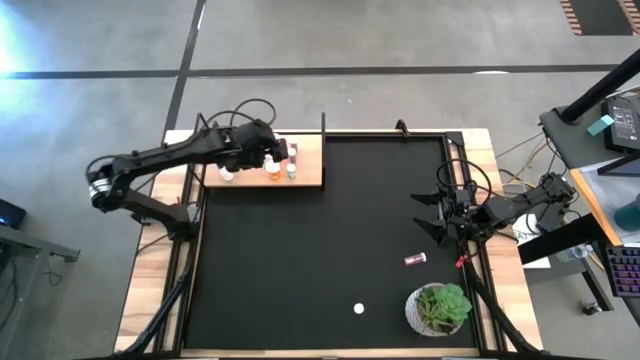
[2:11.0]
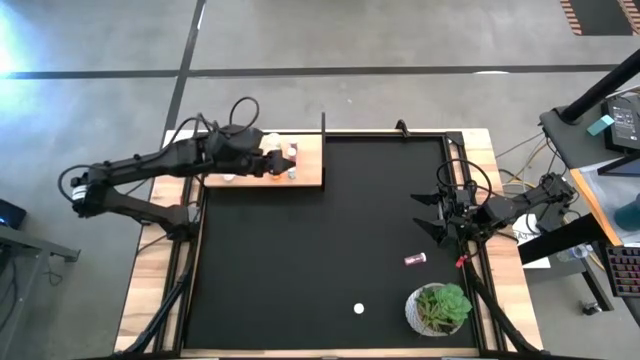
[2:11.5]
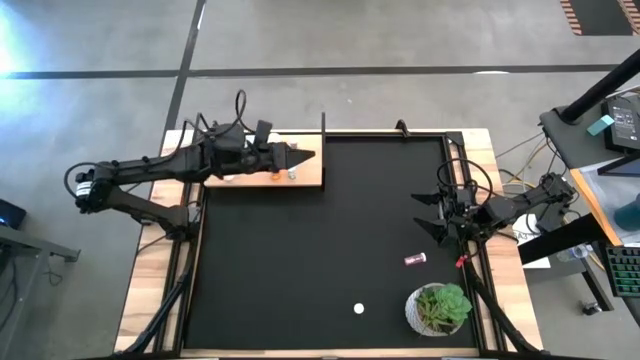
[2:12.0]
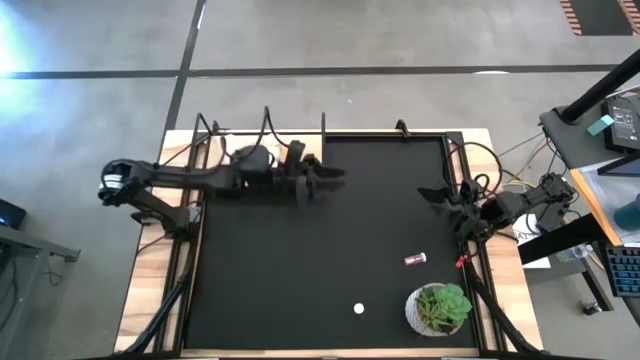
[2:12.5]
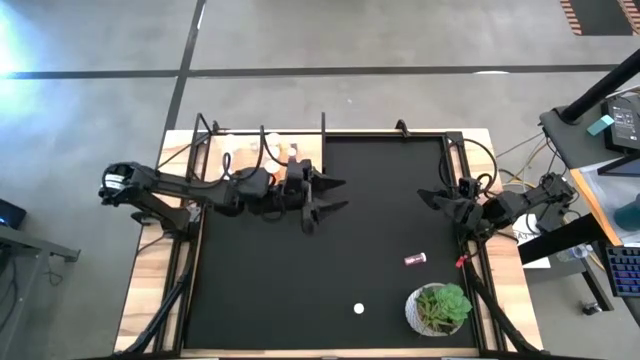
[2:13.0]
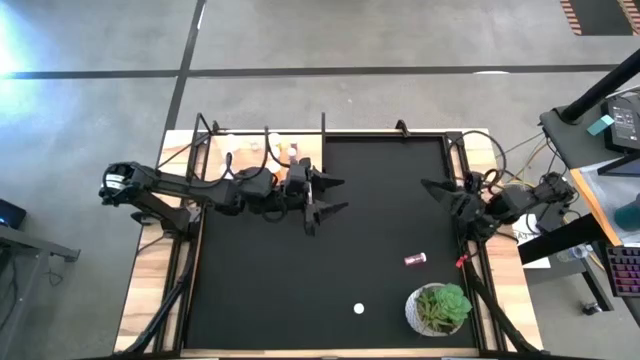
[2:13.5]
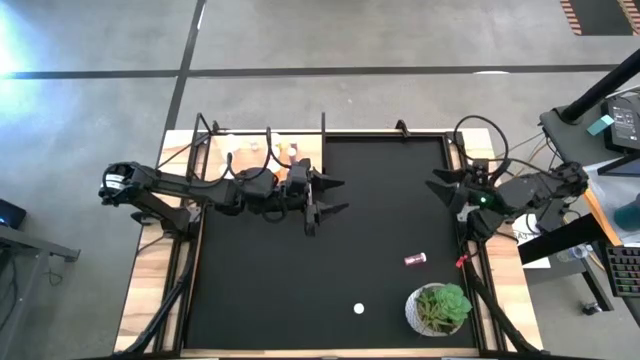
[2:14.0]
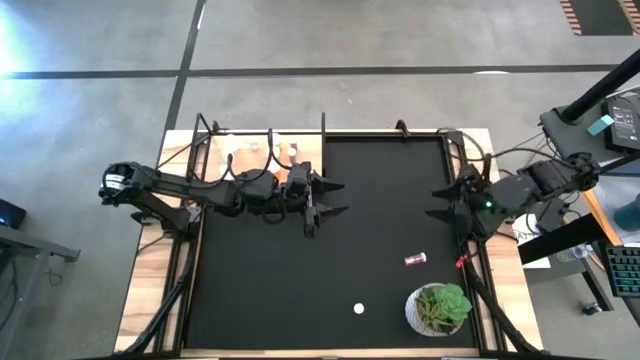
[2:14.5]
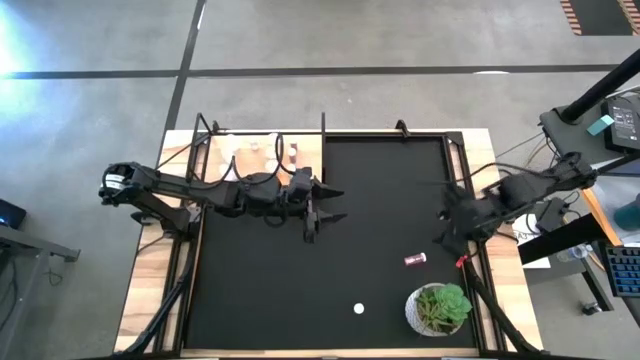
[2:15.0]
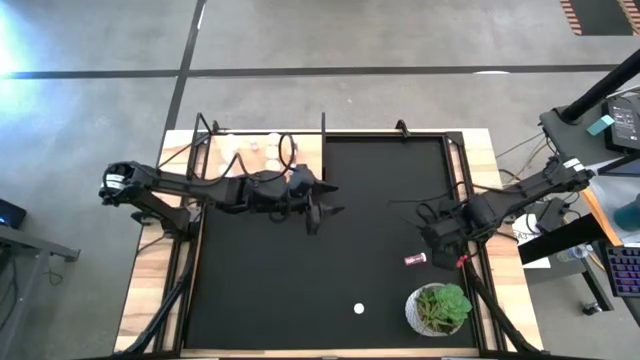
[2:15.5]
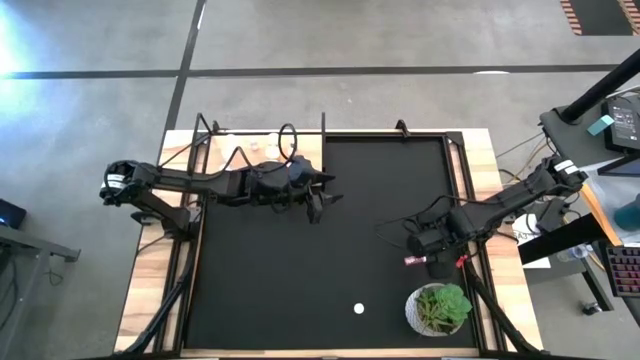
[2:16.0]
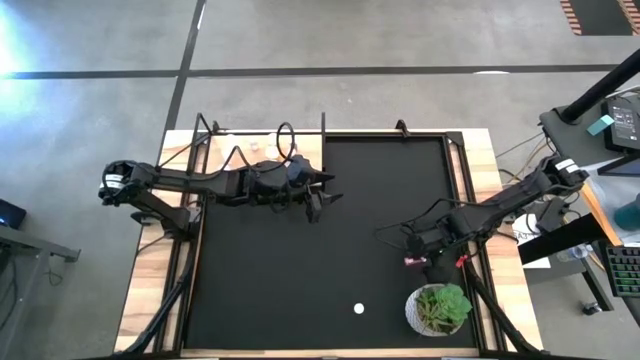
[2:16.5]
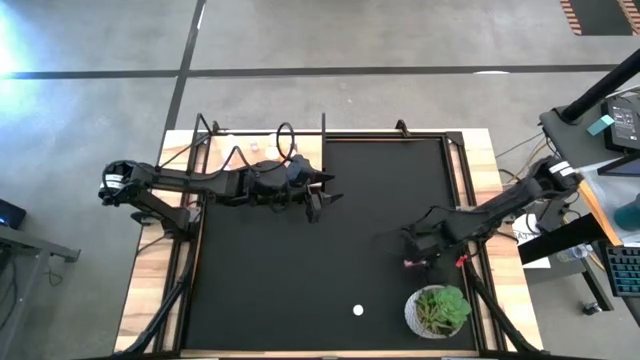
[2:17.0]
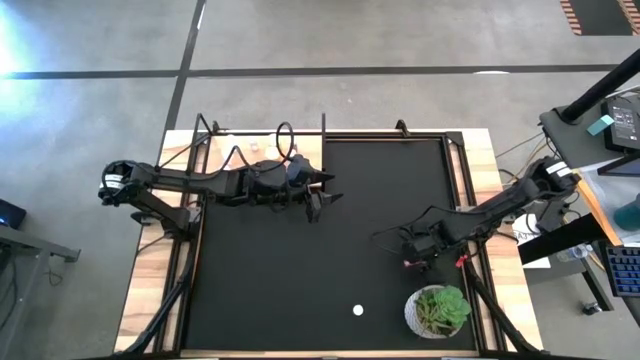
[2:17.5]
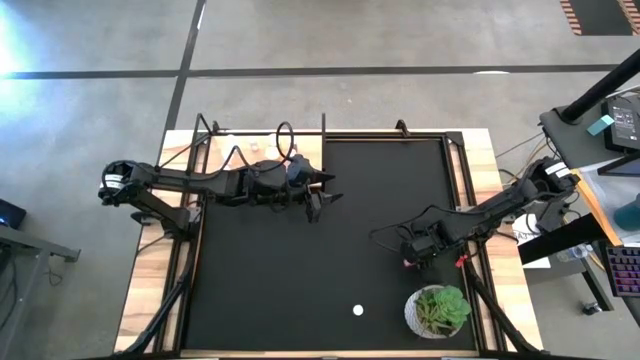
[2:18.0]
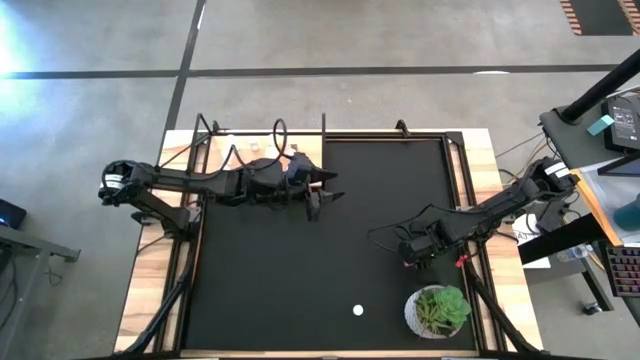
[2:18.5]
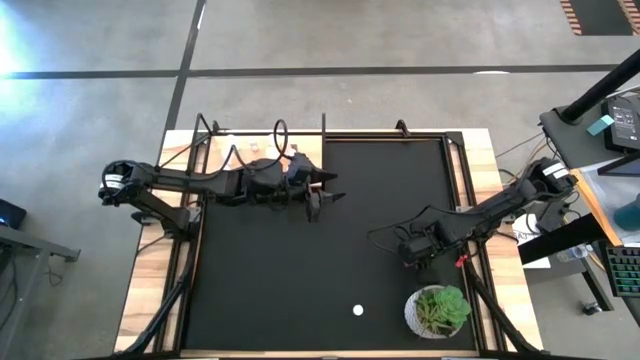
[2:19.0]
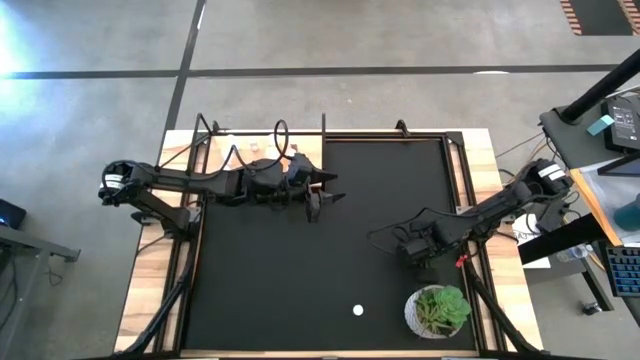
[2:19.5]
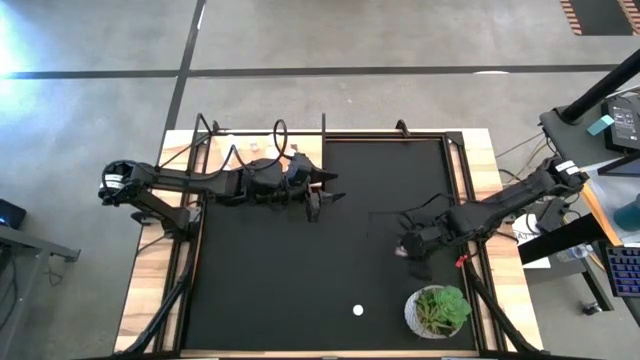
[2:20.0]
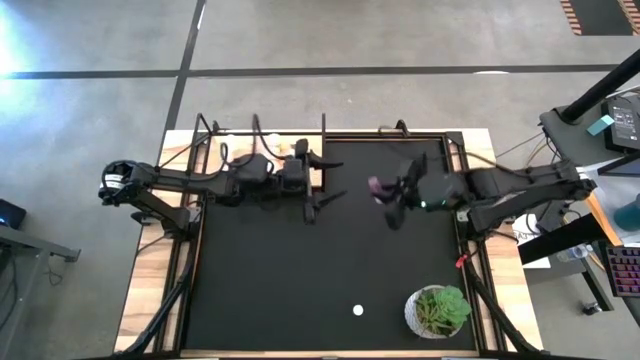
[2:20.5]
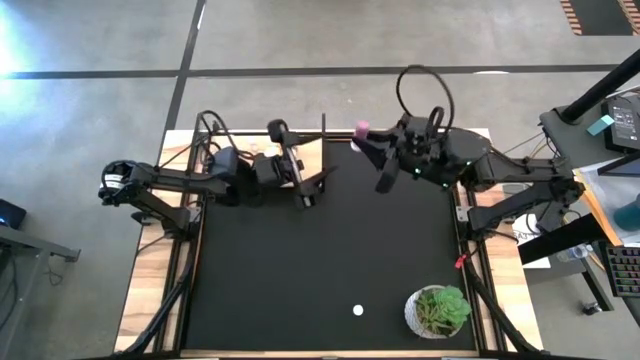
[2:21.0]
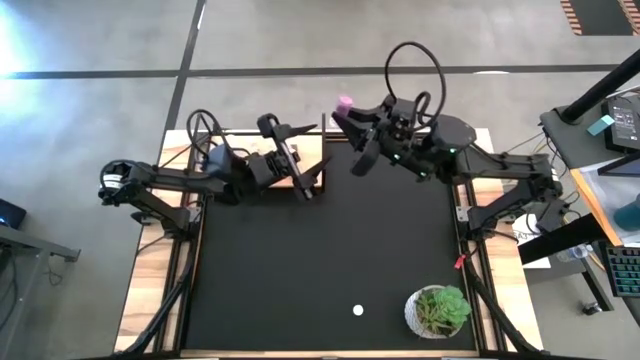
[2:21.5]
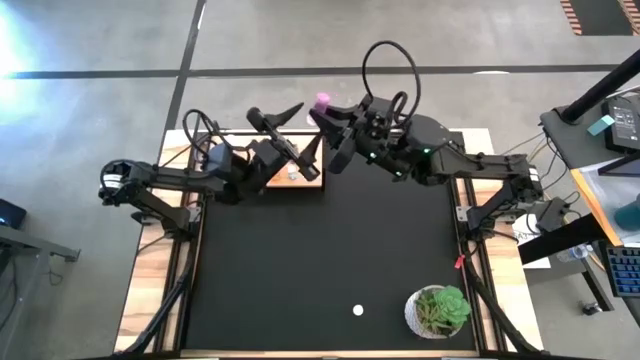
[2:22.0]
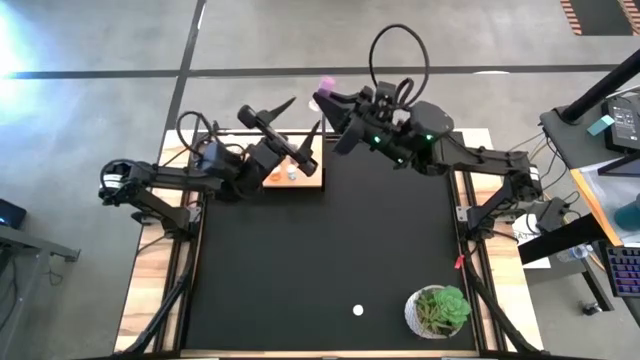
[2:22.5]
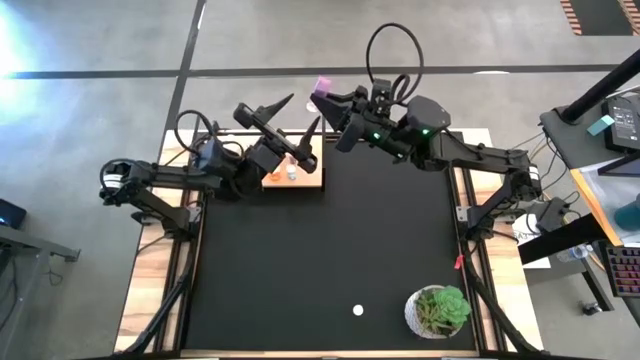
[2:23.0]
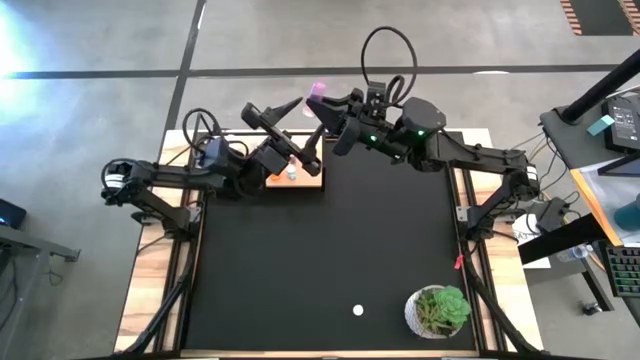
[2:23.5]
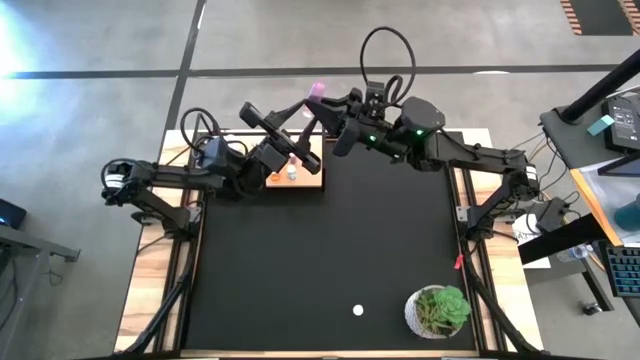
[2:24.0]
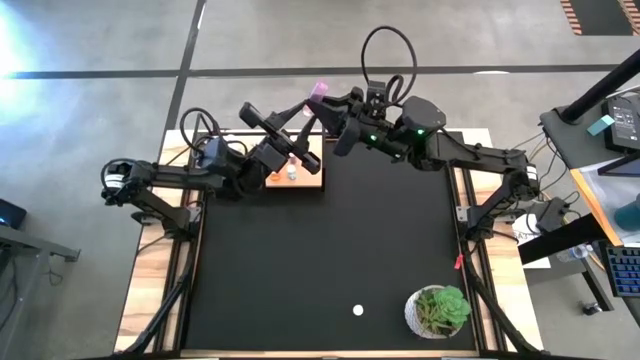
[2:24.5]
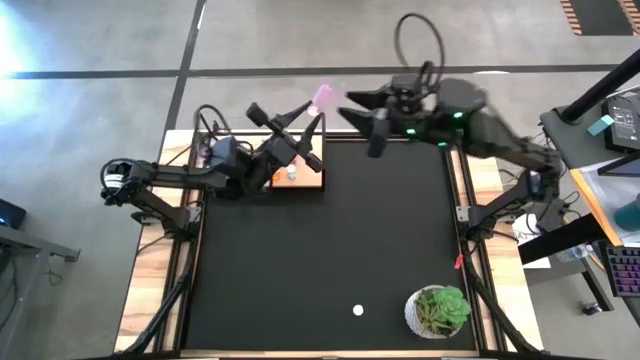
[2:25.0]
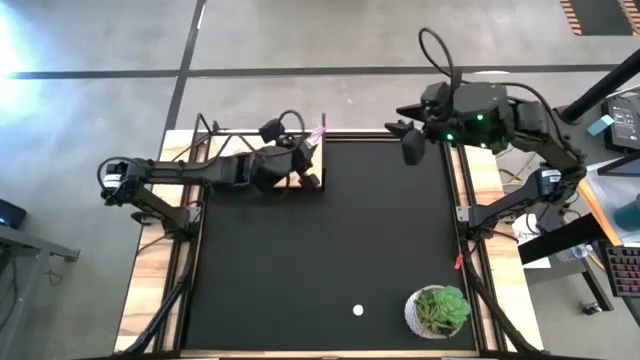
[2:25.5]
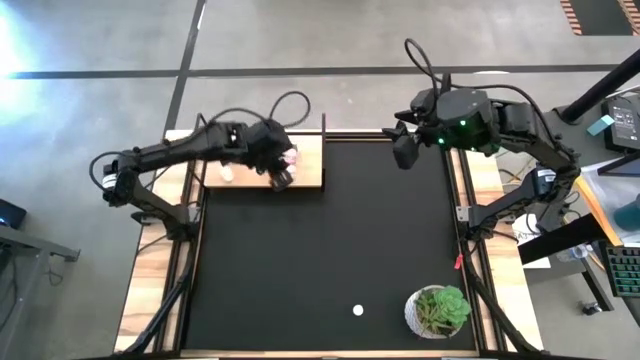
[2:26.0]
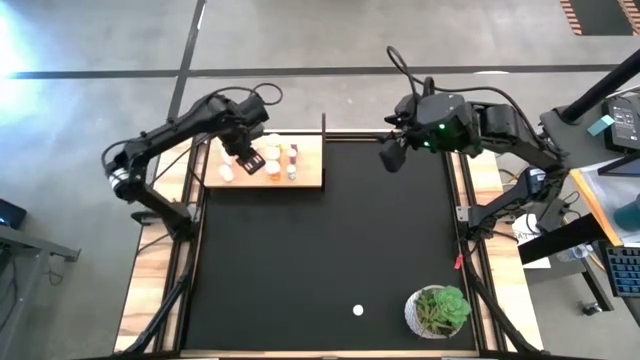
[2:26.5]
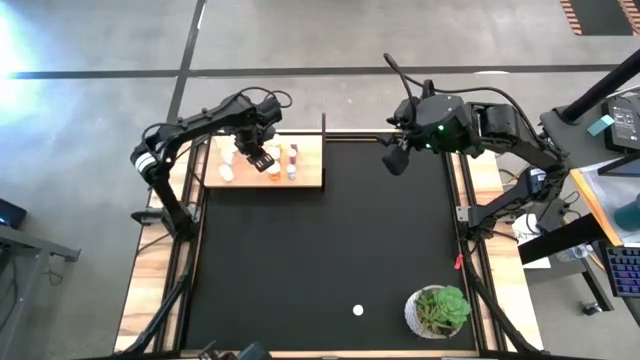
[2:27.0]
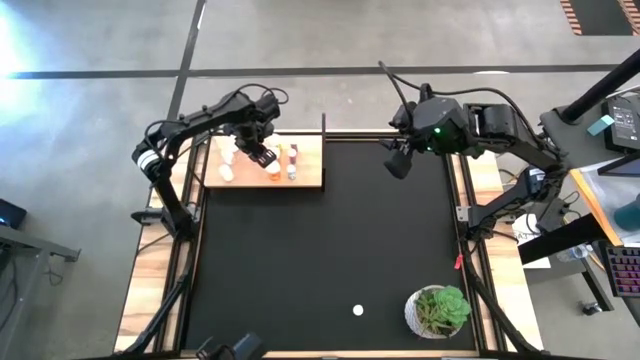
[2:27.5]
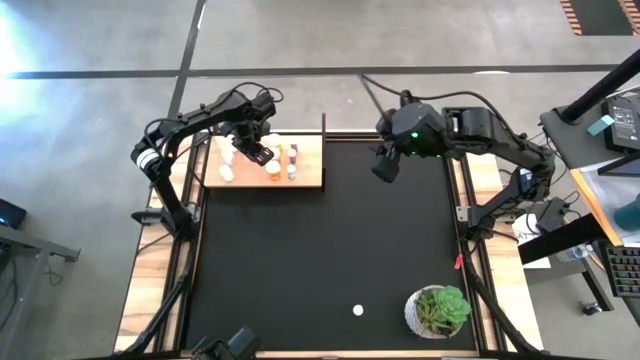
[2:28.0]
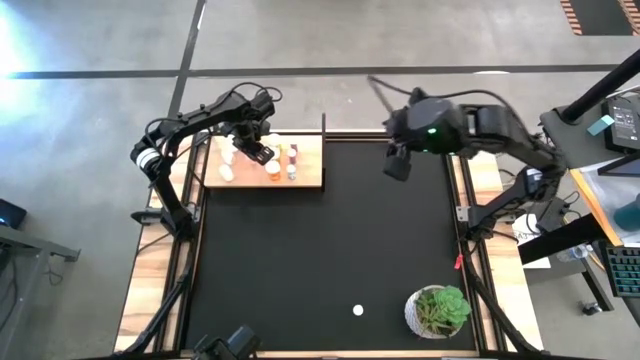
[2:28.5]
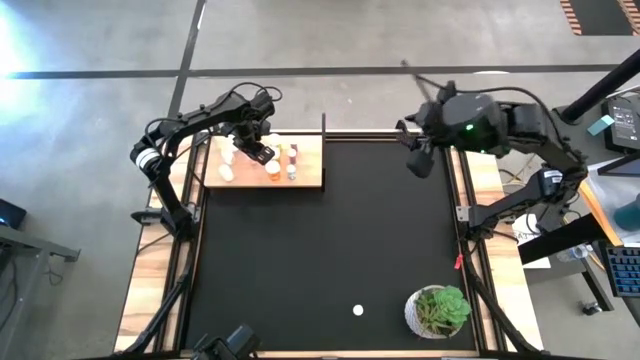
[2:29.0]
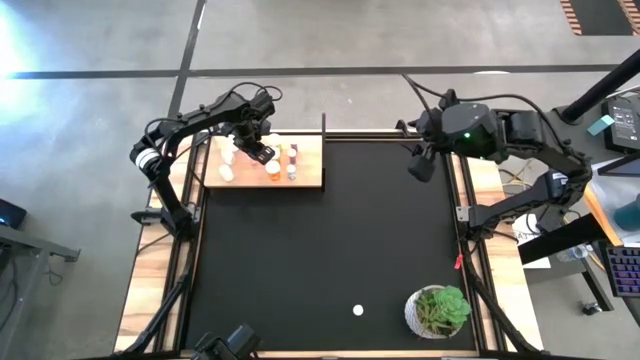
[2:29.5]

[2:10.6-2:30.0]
Task: Pick and place medicine bottles onto shelf by color
Put the top pink pill bottle on the shelf aligned with the other pink pill bottle

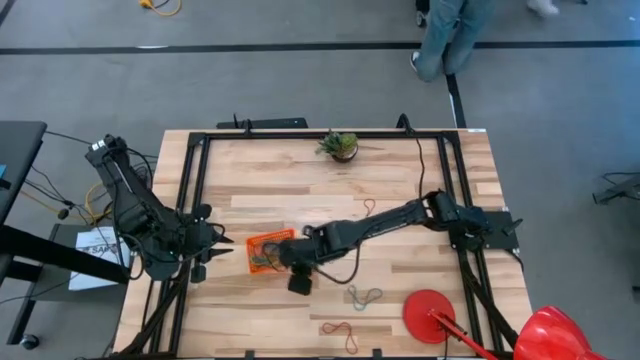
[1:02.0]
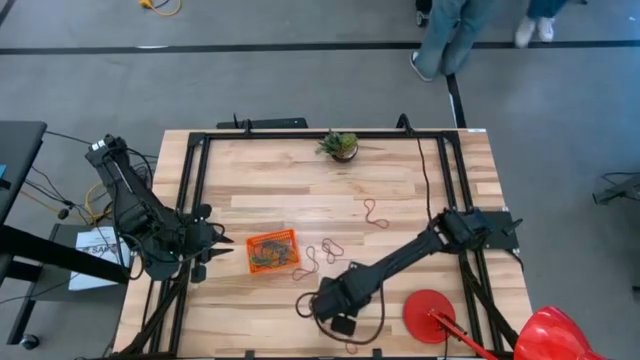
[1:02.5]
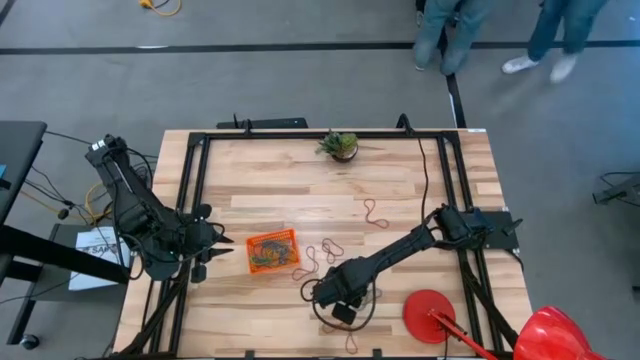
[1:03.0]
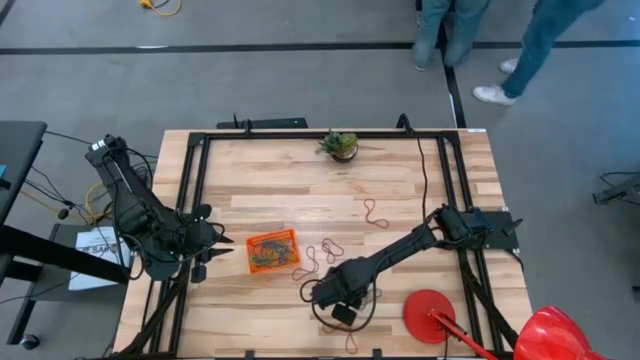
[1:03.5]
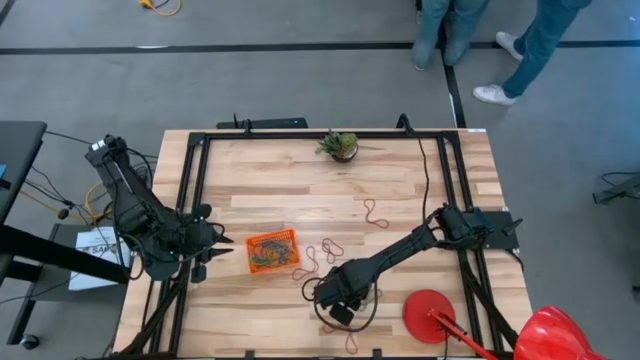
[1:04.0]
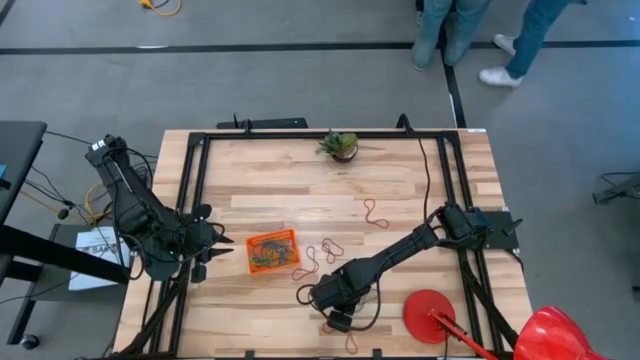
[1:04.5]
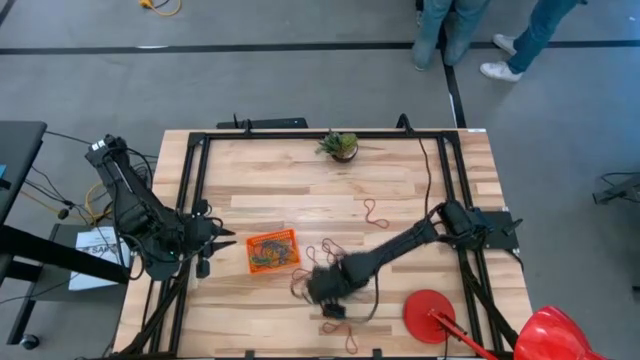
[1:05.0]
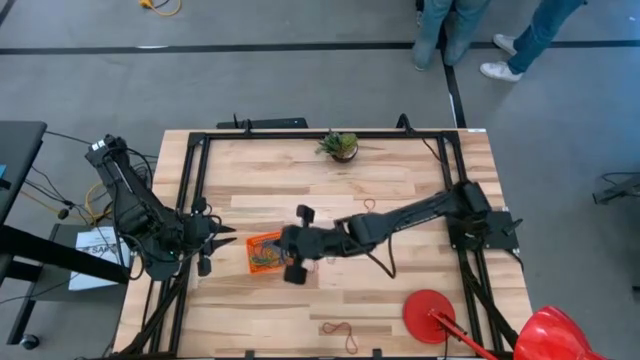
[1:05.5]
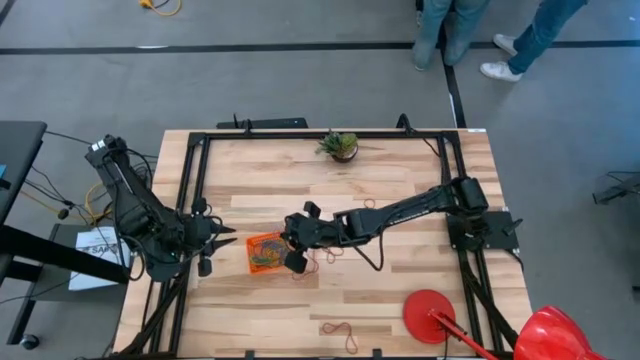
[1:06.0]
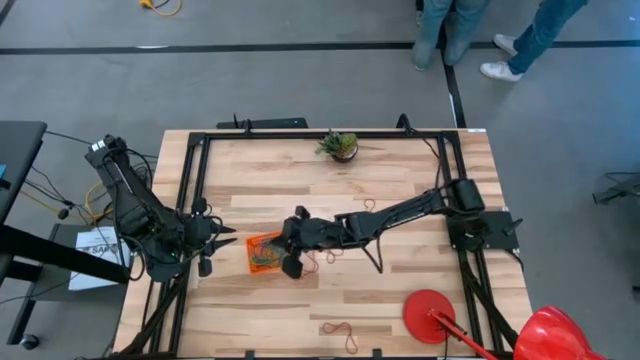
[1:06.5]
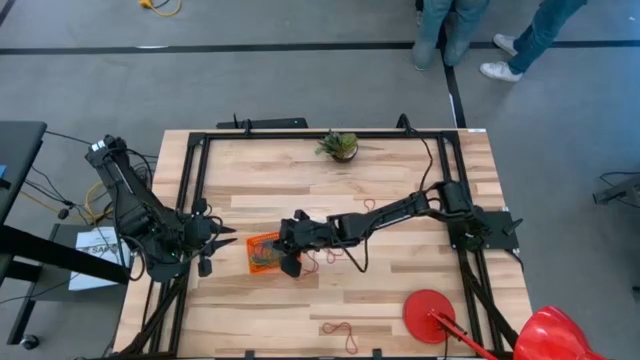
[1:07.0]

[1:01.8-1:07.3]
Task: Pick and place rubber bands into bin
Put the blue rubber band into the orange container
